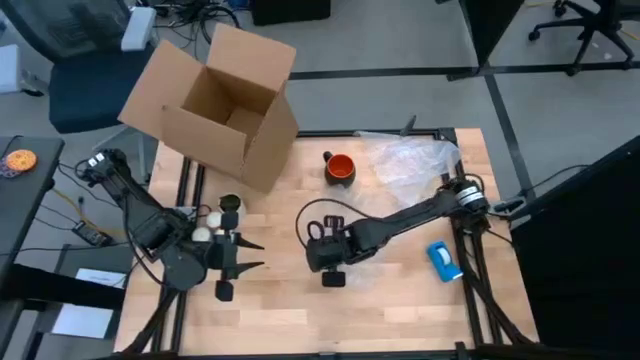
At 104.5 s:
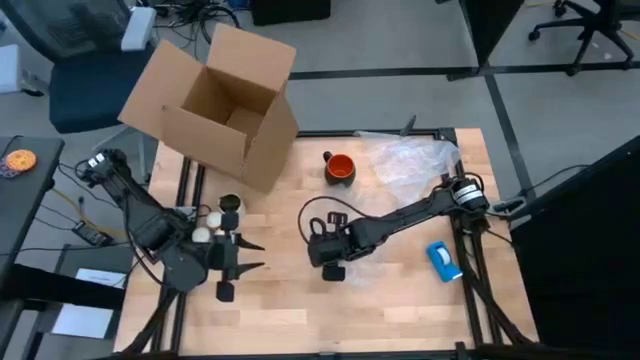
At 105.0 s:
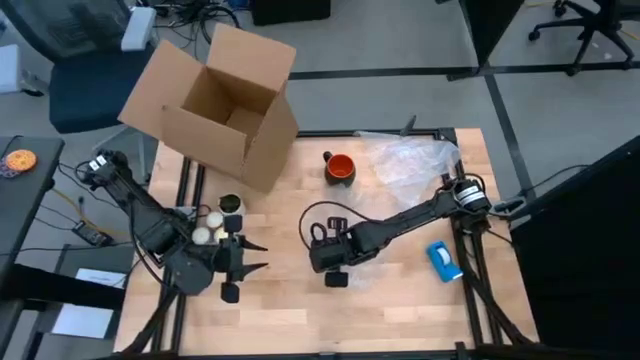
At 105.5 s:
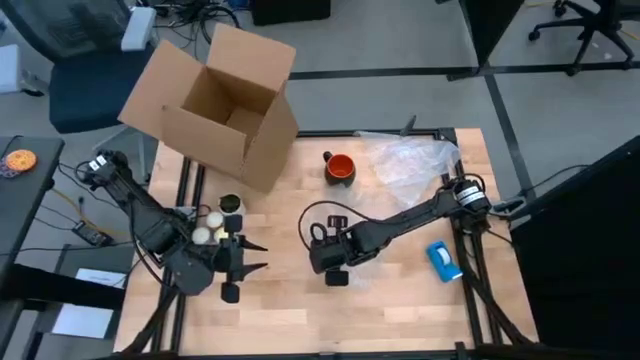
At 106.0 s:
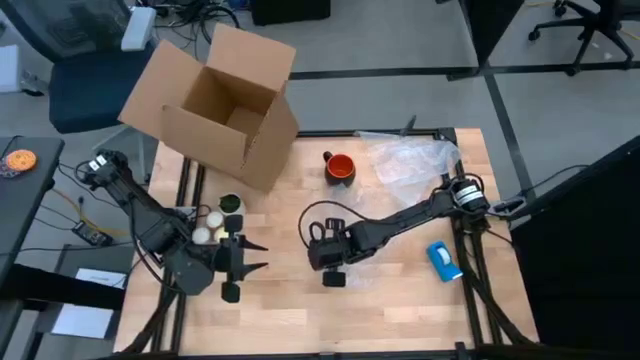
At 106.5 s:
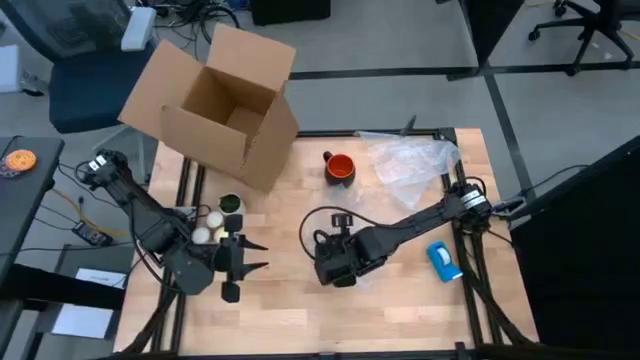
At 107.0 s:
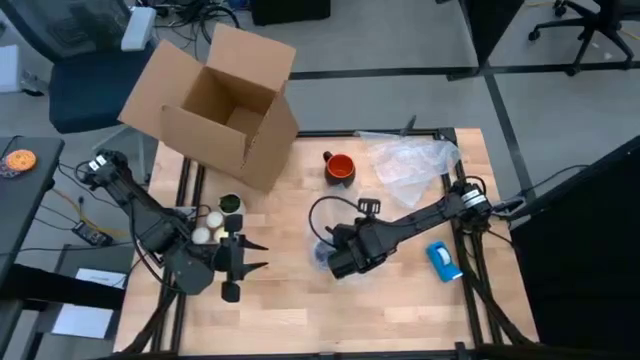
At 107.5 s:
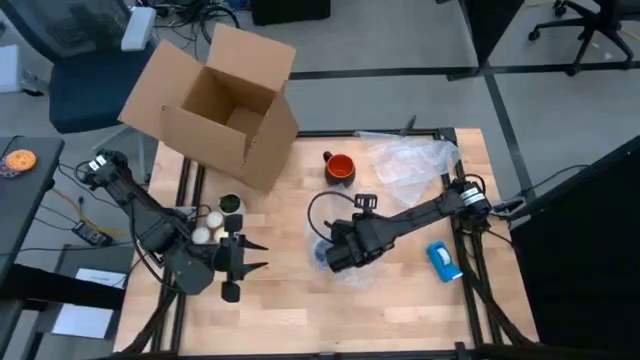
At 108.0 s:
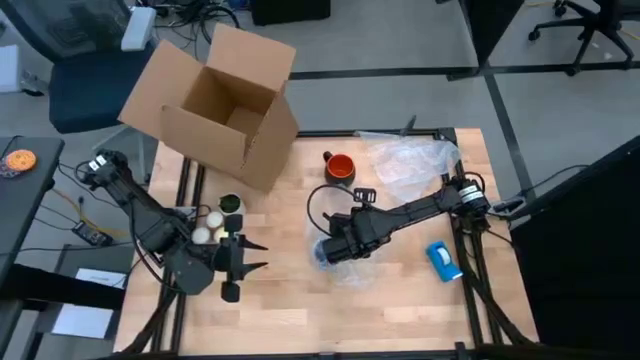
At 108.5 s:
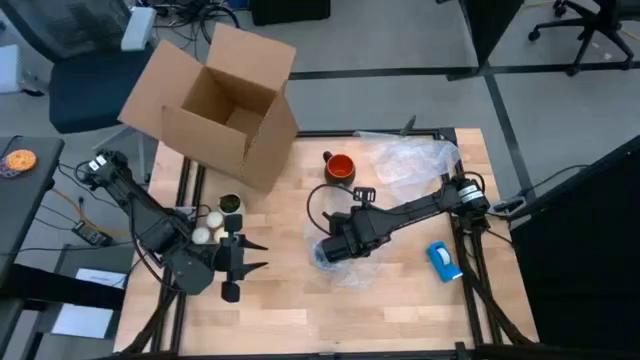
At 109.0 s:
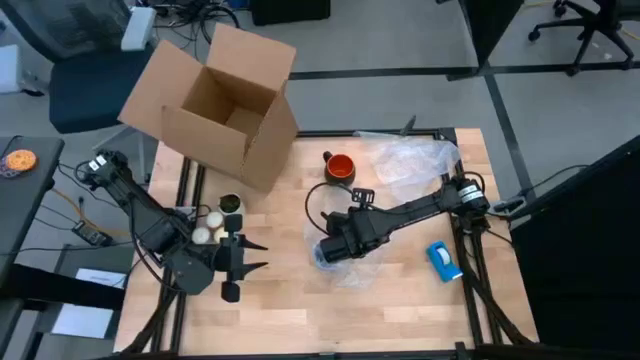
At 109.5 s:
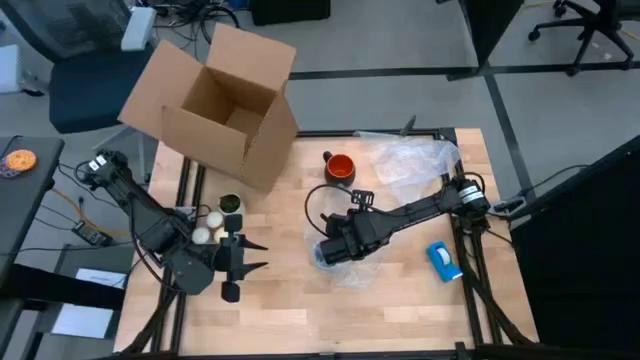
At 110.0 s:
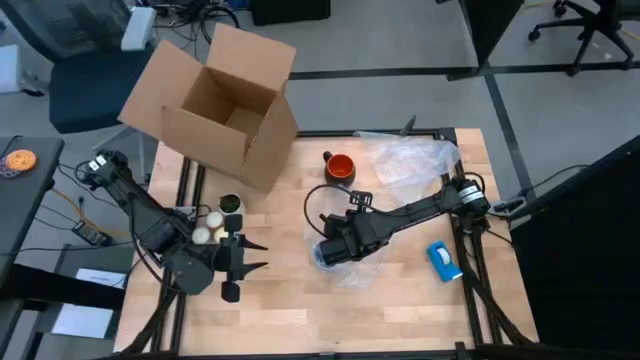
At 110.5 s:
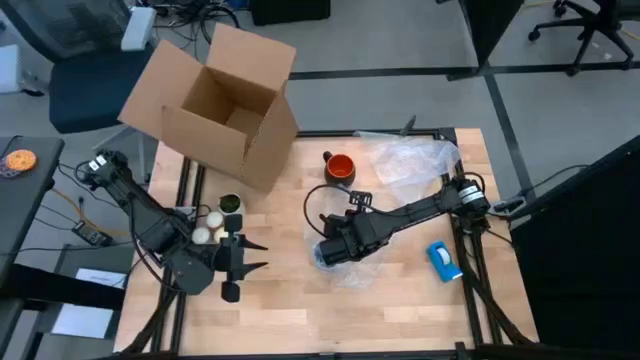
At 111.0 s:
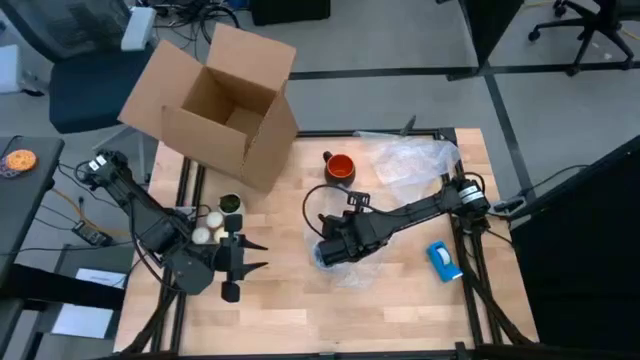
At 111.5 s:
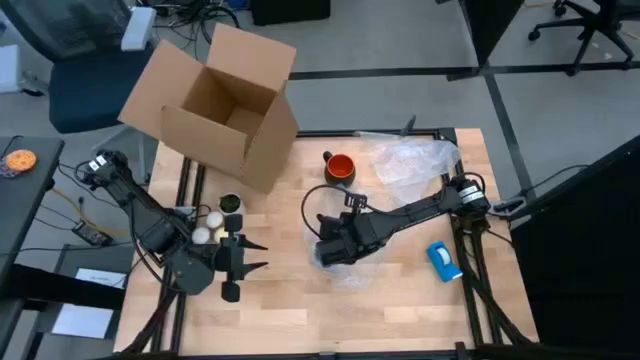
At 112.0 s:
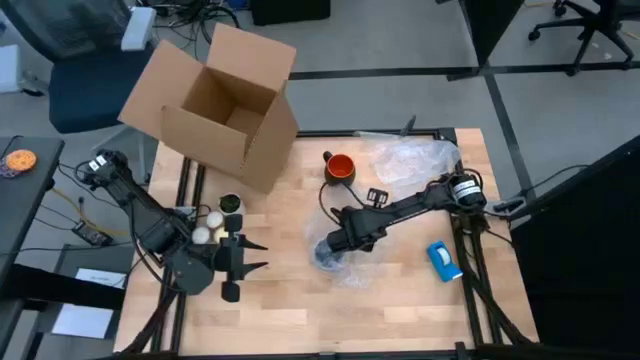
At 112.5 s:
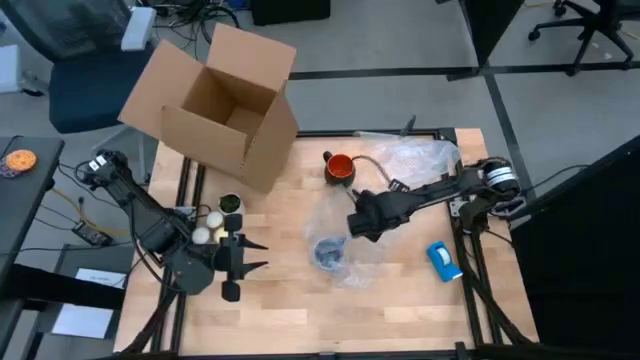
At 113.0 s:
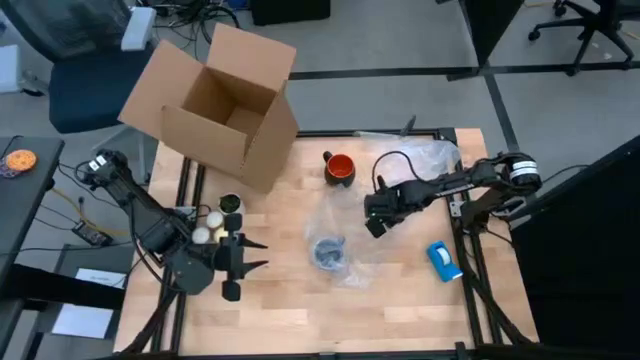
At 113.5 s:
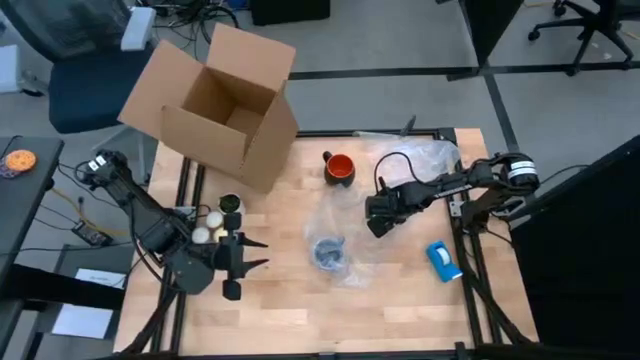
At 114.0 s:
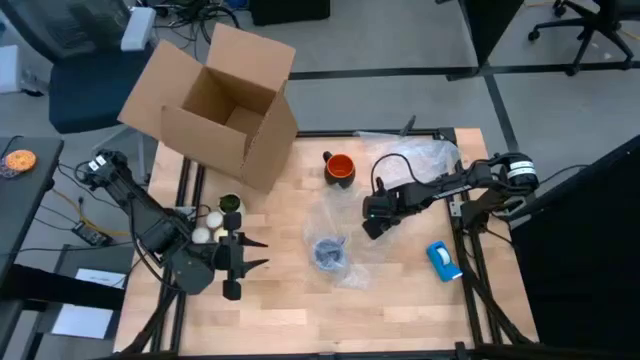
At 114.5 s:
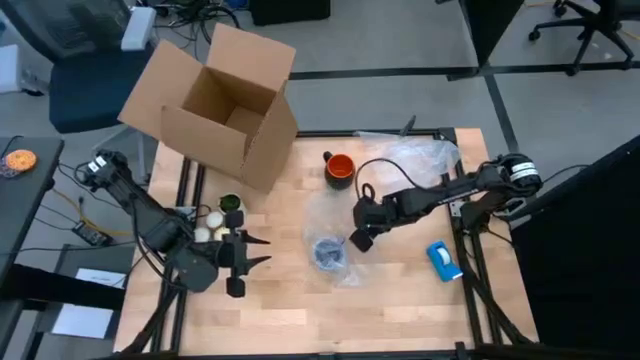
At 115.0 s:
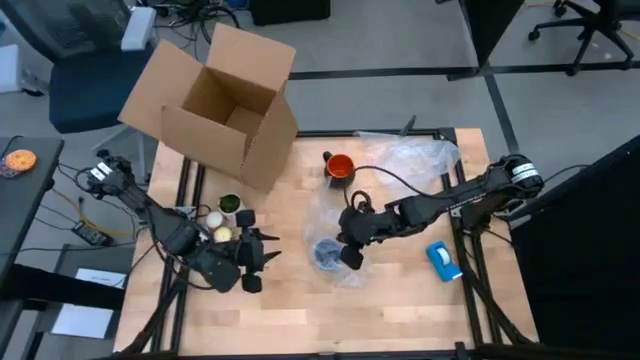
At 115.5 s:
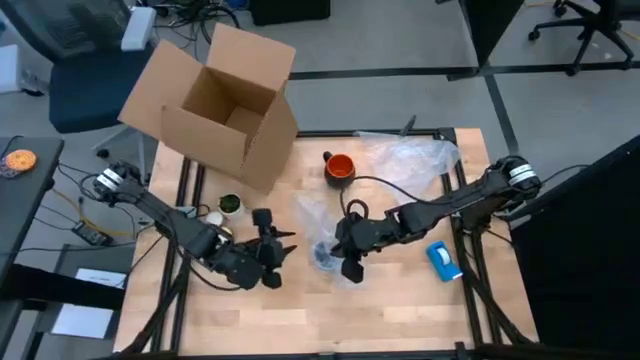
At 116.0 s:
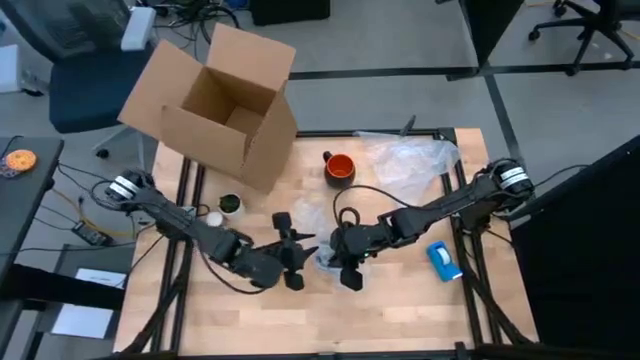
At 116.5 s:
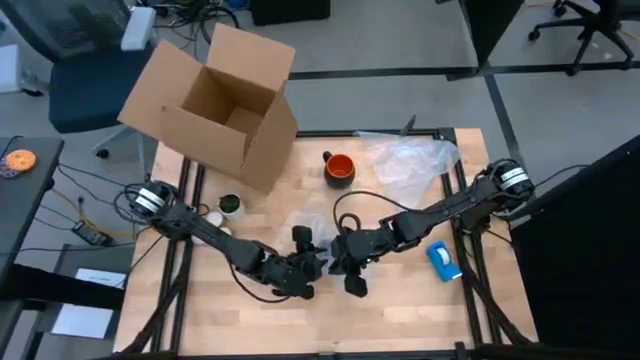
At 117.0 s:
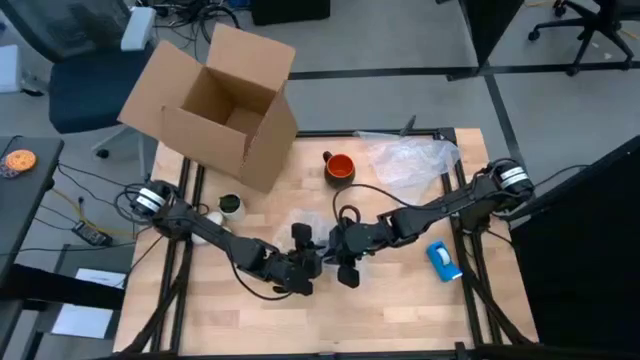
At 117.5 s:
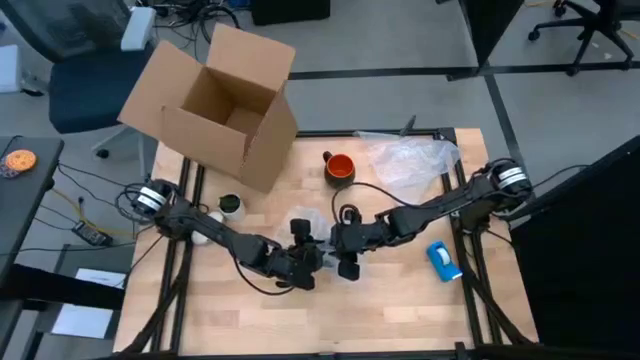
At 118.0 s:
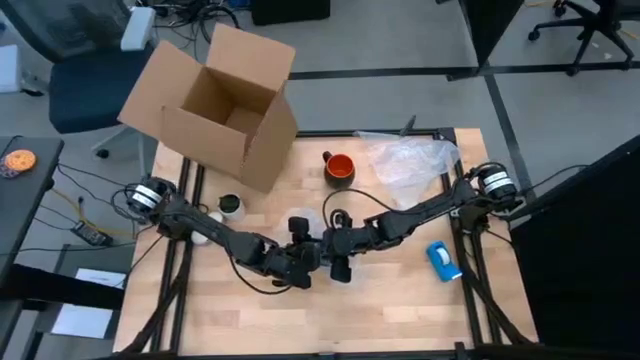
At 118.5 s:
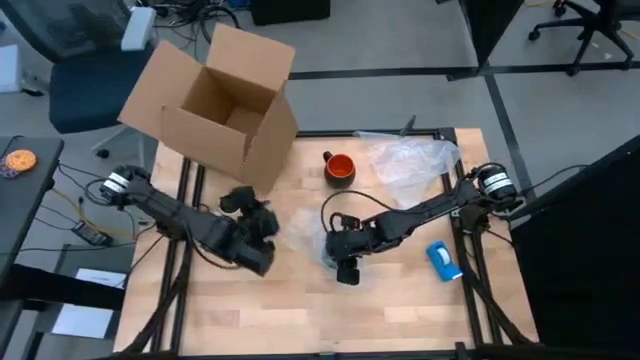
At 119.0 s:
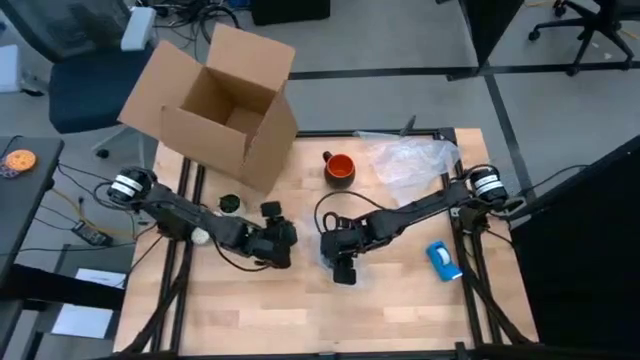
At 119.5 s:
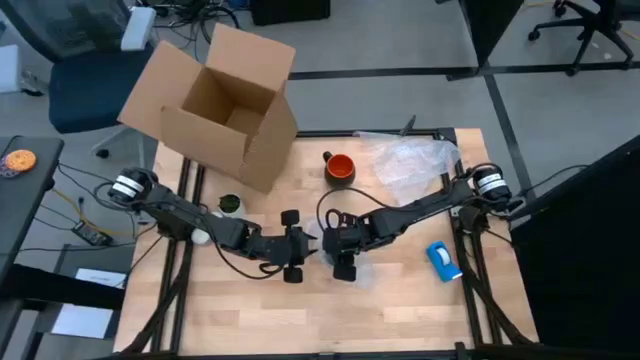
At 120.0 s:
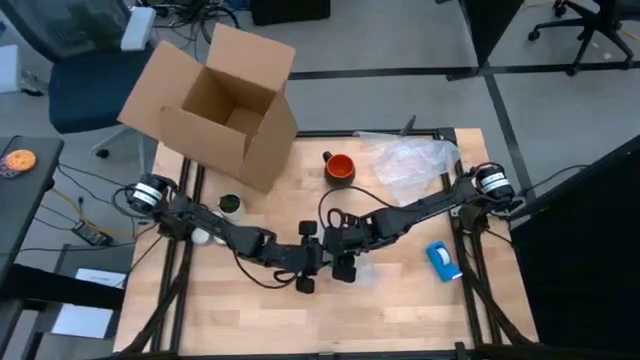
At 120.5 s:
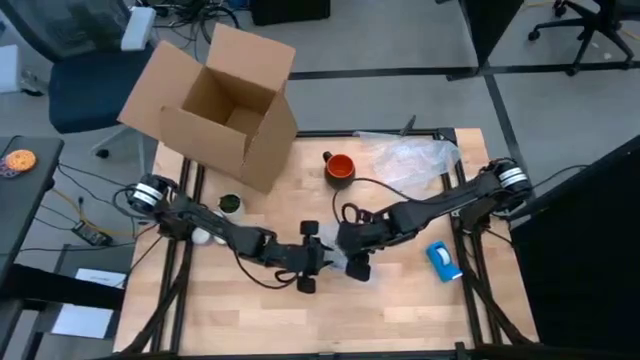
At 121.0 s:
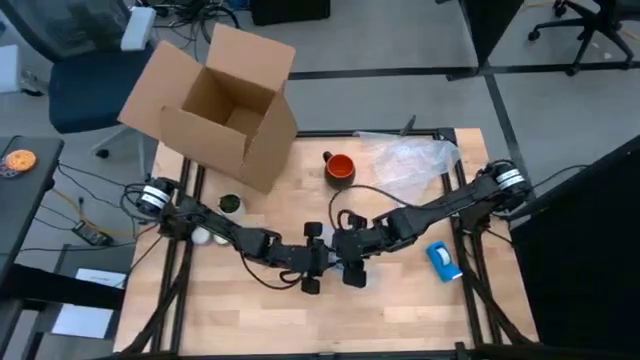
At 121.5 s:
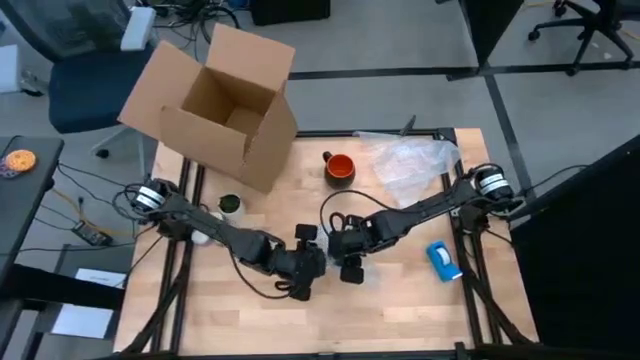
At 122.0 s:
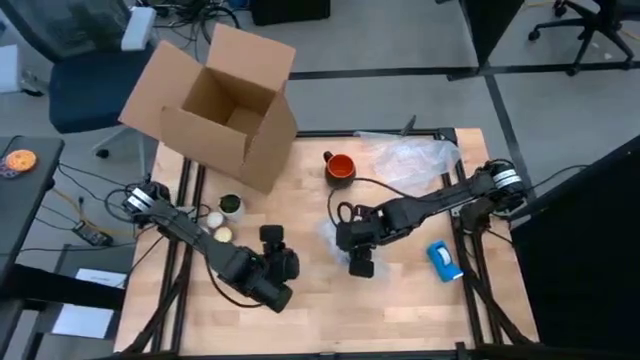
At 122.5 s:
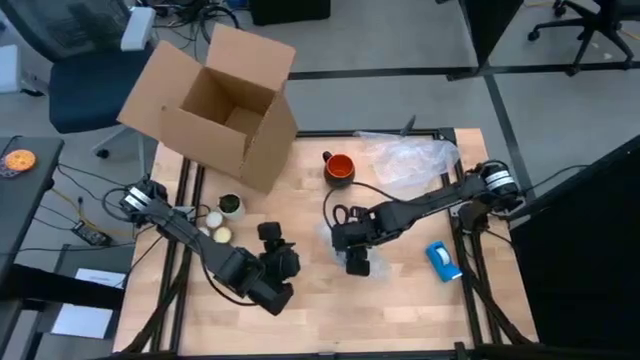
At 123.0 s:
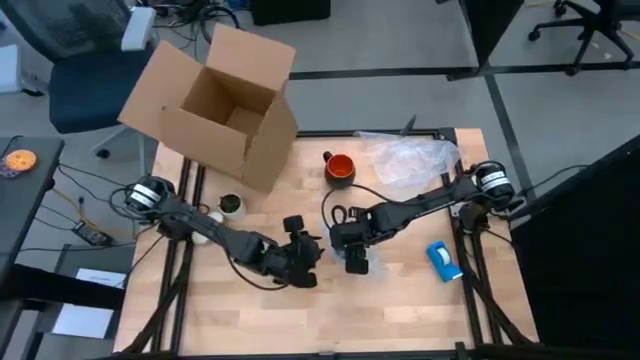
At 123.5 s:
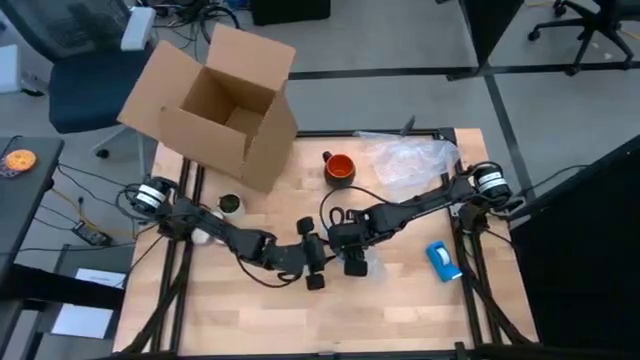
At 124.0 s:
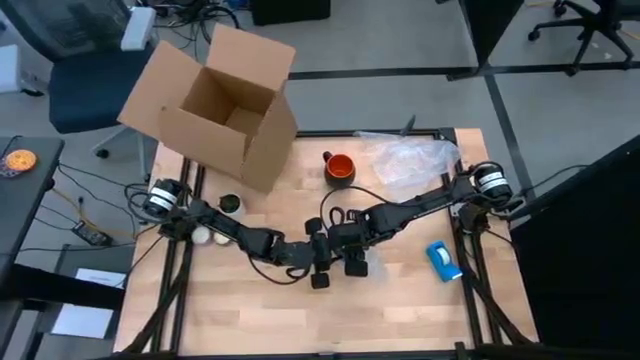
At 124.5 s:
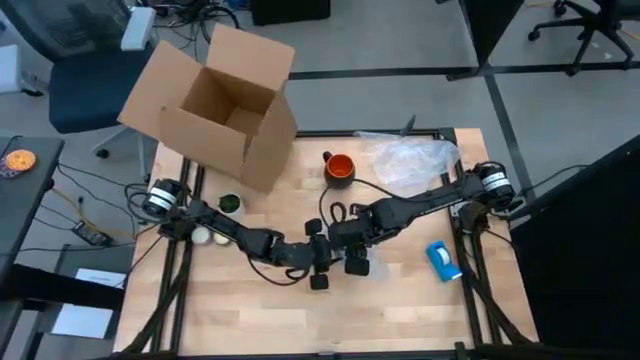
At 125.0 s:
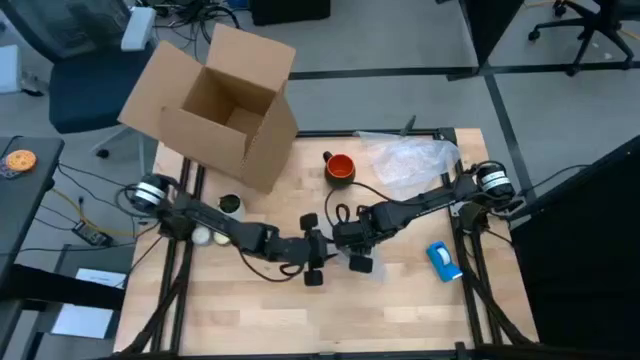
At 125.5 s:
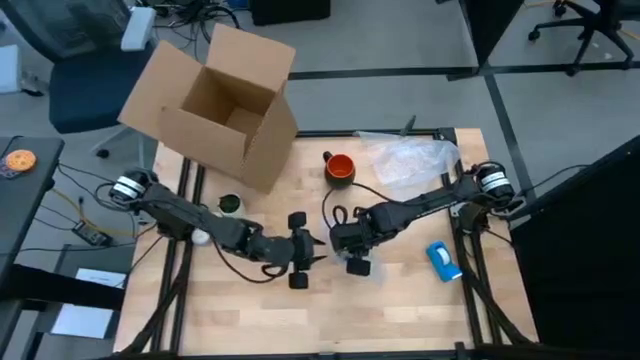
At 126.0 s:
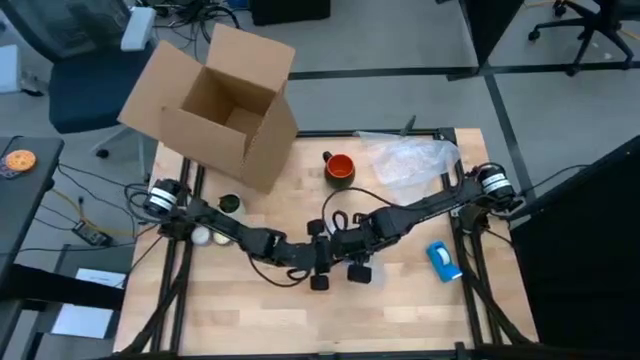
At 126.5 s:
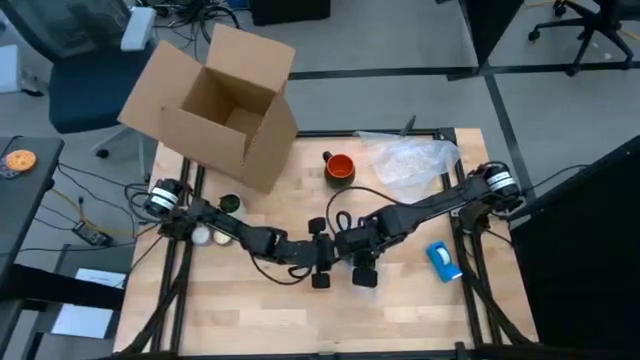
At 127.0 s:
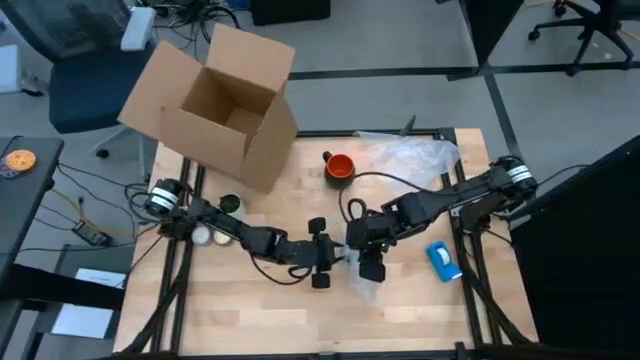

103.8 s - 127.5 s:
Task: wrap mug
Wrap the blue mug with bubble wrap
